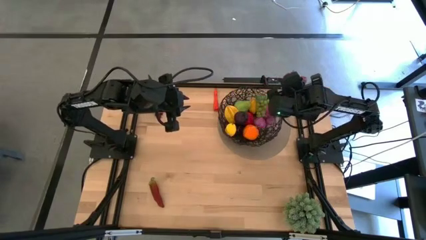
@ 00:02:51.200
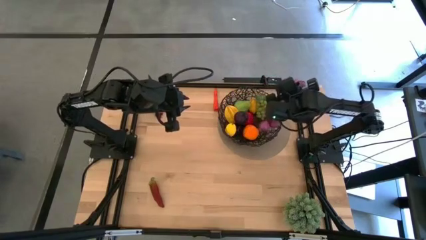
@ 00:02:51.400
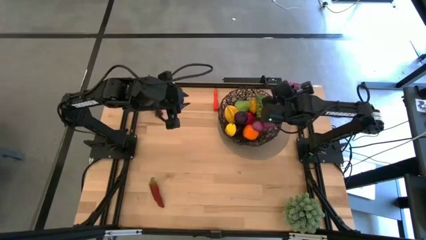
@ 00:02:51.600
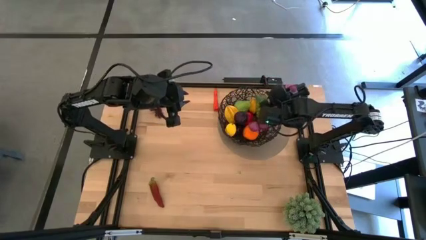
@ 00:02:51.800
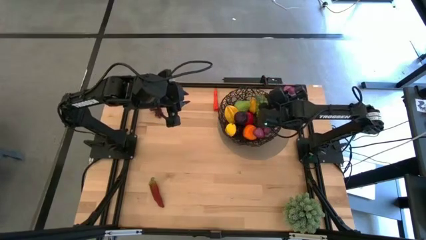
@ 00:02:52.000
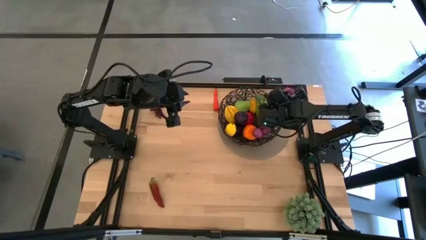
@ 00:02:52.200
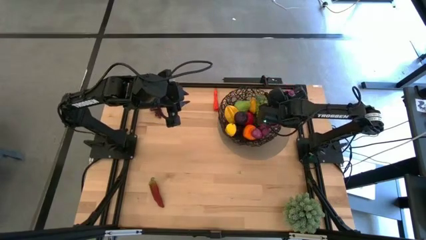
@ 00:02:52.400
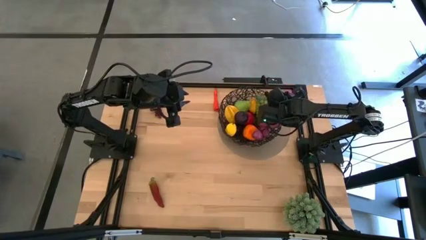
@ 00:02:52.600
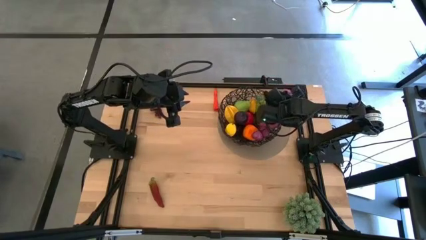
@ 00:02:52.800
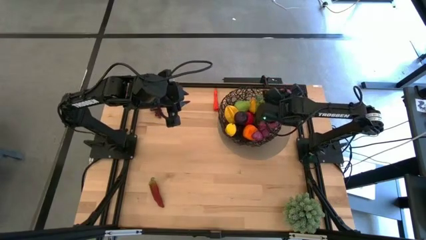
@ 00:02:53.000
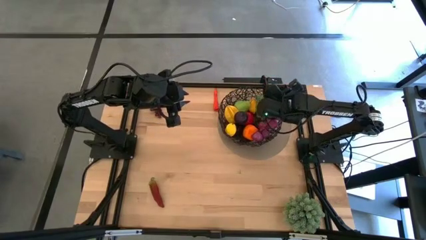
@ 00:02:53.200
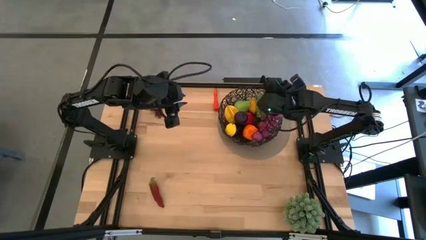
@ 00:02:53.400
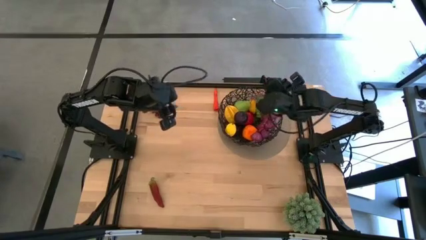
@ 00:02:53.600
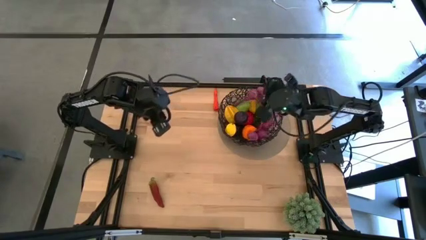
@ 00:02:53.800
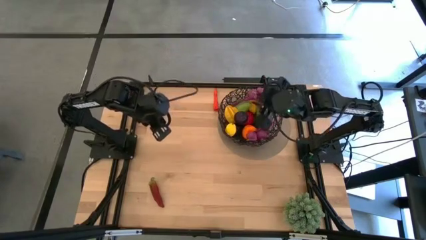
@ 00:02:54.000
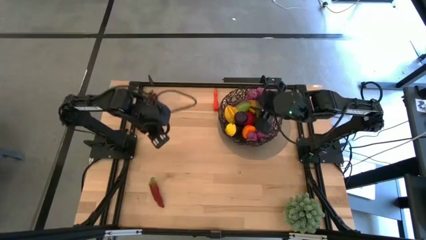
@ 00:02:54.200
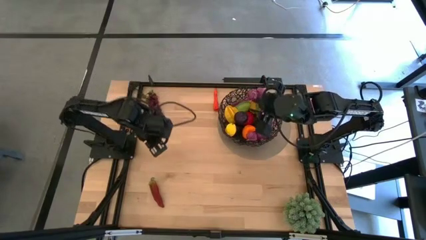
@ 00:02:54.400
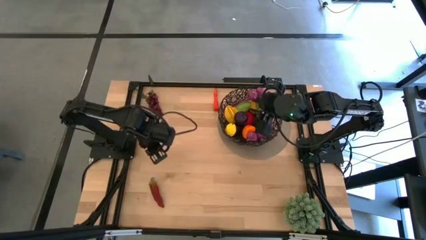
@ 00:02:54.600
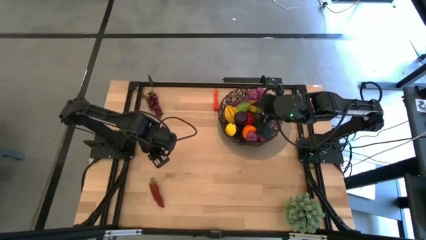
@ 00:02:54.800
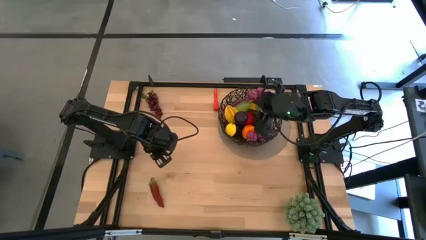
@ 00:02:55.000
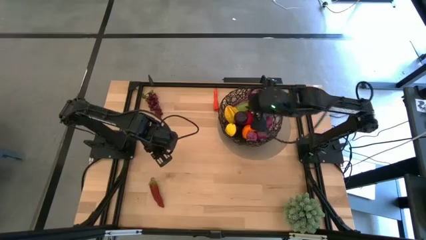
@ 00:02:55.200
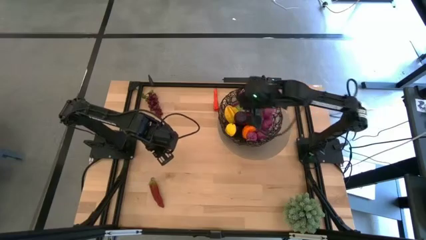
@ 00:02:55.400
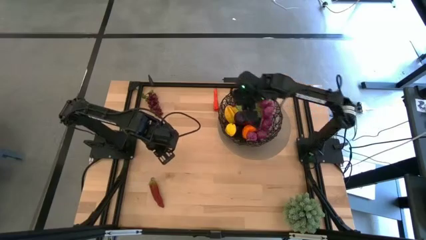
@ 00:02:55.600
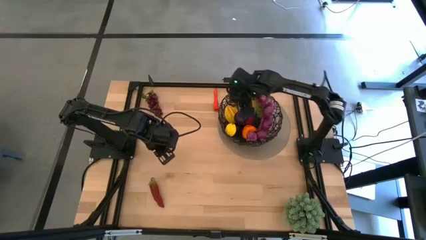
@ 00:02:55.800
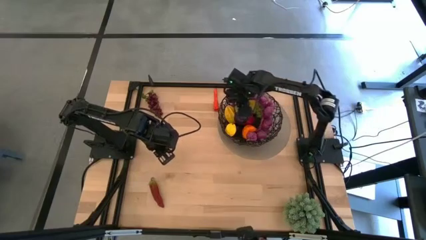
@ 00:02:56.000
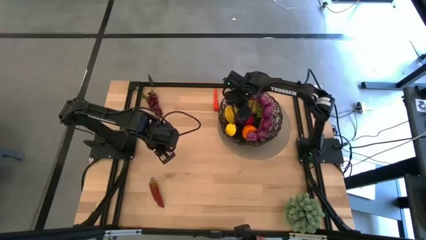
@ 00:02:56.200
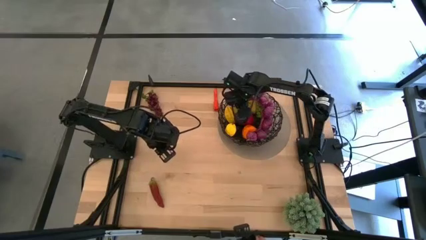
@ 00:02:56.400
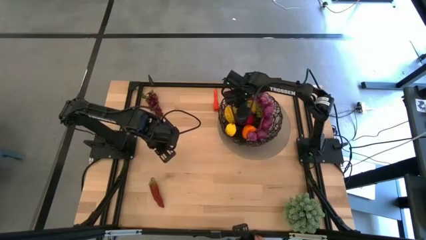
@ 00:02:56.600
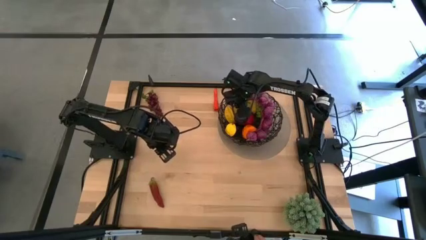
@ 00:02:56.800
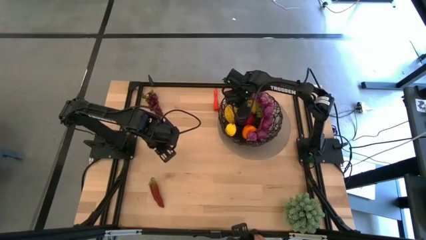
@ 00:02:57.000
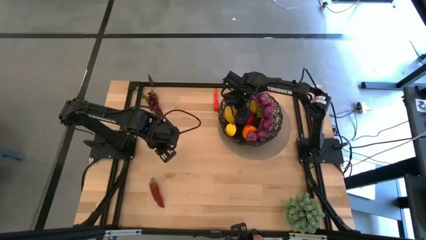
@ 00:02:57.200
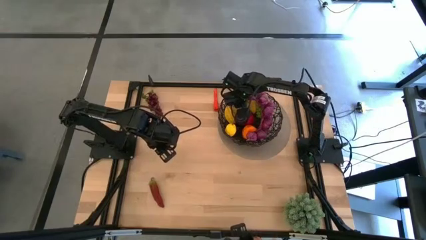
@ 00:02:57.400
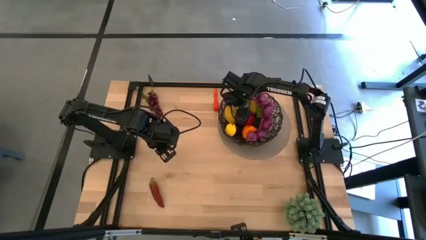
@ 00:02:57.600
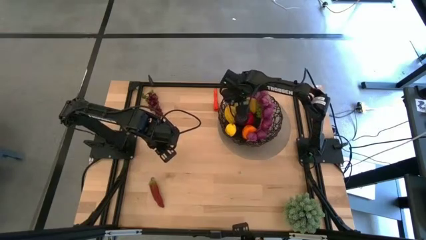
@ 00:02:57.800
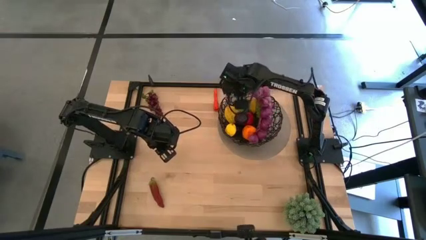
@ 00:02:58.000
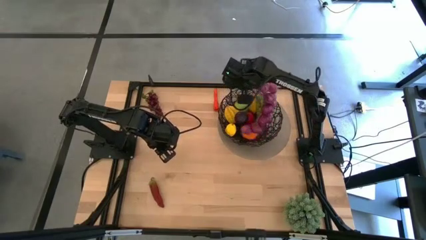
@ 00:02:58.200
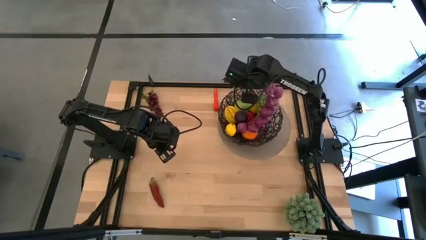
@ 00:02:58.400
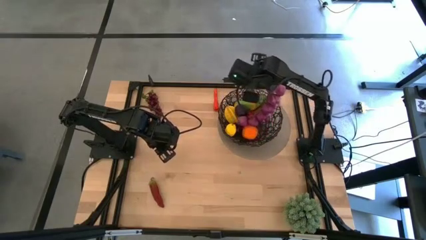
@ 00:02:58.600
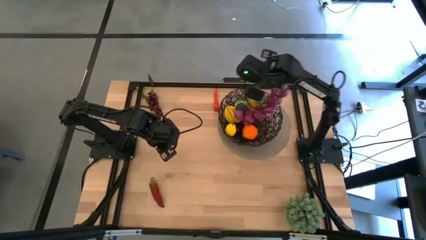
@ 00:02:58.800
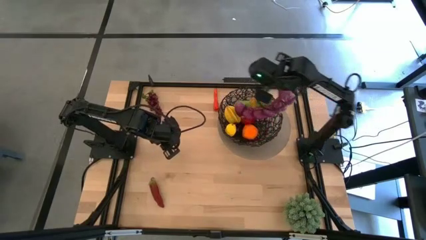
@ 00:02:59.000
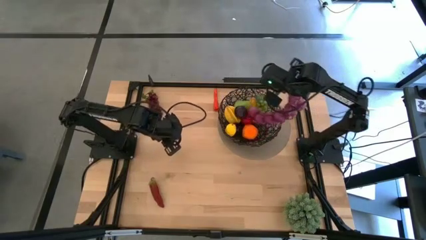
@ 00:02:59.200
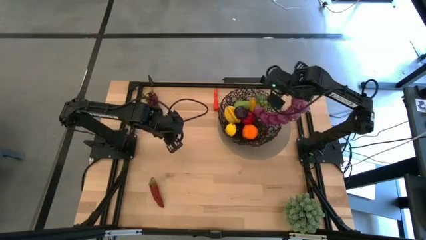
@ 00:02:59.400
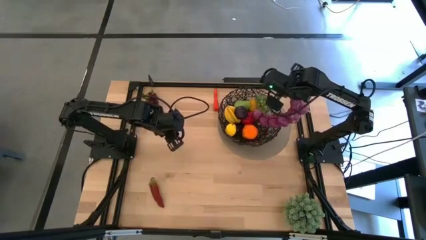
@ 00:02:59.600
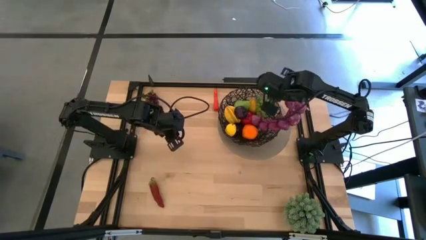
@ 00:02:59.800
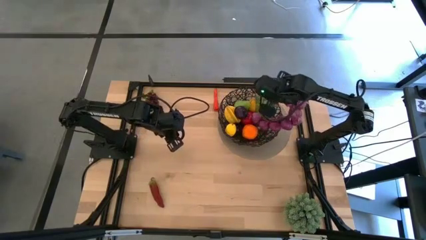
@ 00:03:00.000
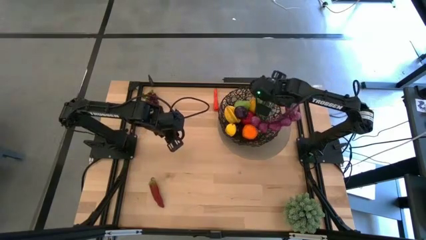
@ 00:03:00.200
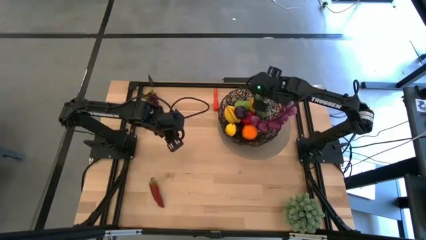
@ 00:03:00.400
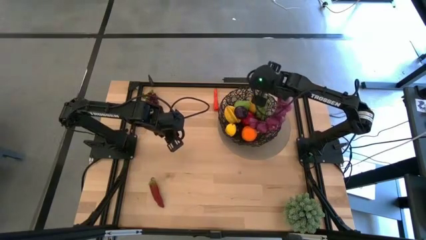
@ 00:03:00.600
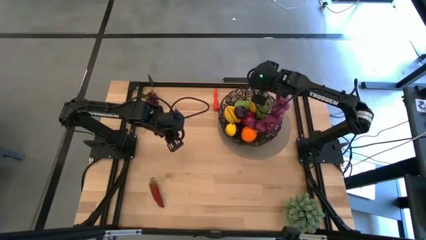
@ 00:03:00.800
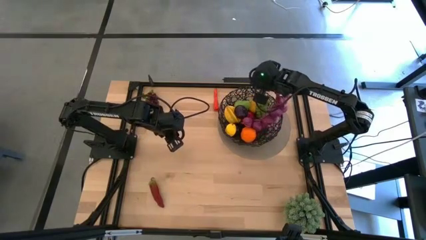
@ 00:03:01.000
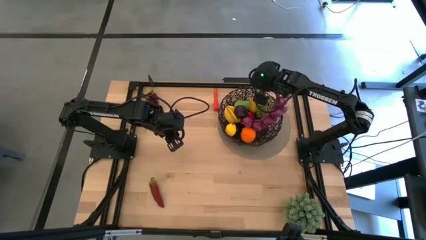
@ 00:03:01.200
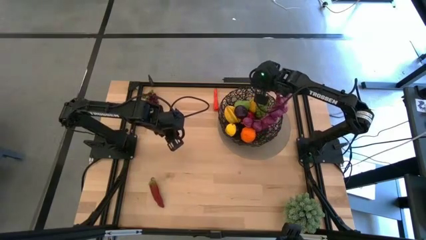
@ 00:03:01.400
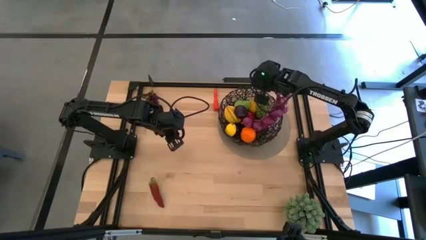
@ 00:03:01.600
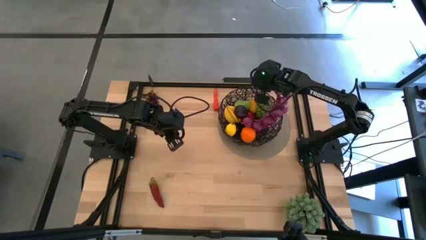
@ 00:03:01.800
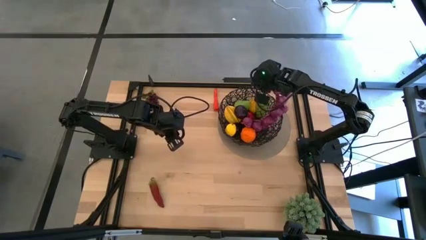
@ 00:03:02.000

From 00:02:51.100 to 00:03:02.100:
Task: Build produce basket
Put the purple garlic into the black wire basket

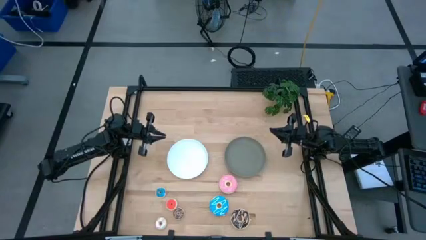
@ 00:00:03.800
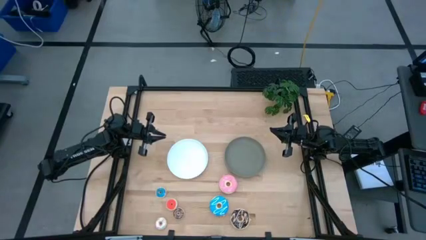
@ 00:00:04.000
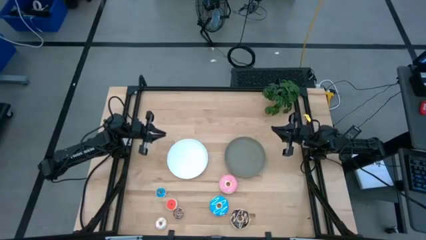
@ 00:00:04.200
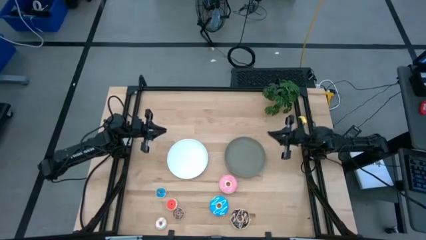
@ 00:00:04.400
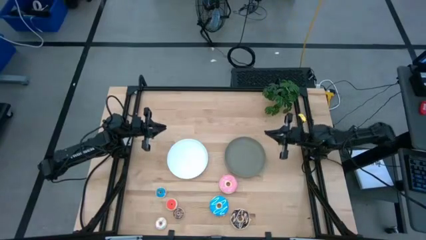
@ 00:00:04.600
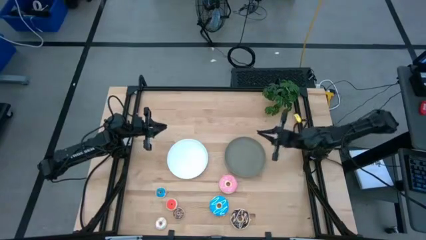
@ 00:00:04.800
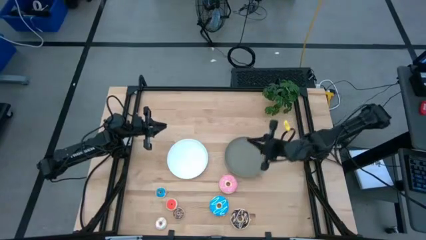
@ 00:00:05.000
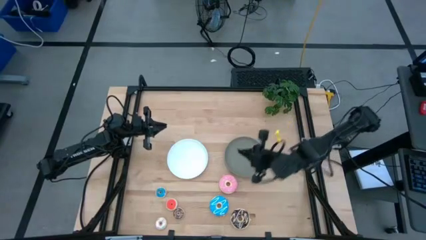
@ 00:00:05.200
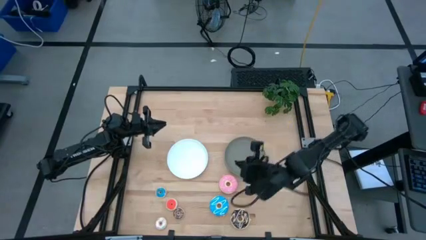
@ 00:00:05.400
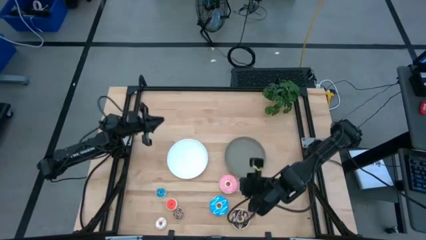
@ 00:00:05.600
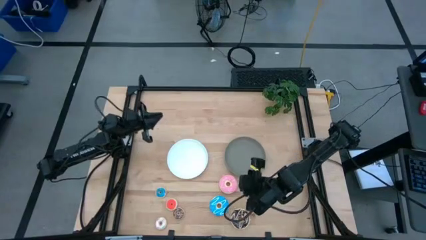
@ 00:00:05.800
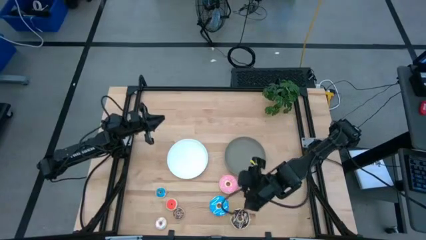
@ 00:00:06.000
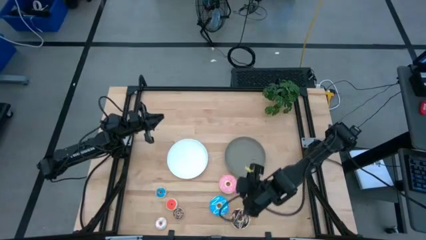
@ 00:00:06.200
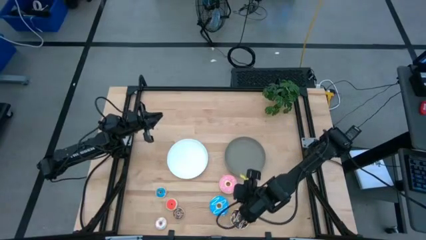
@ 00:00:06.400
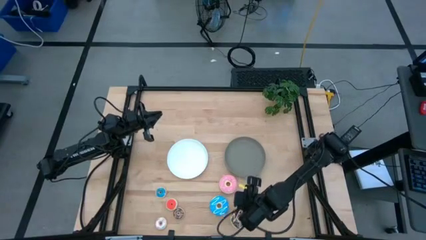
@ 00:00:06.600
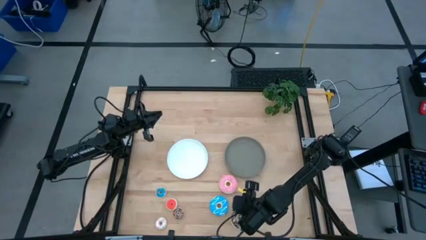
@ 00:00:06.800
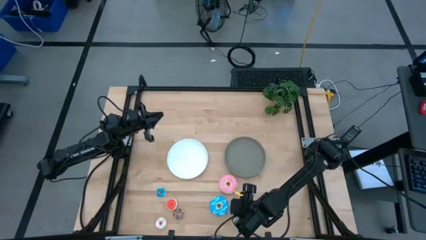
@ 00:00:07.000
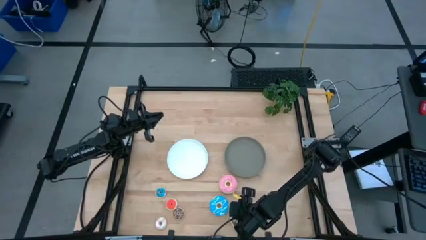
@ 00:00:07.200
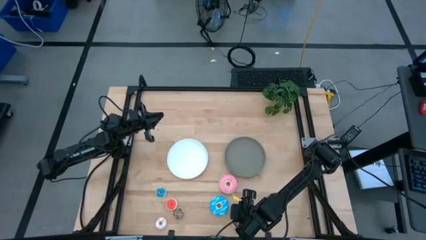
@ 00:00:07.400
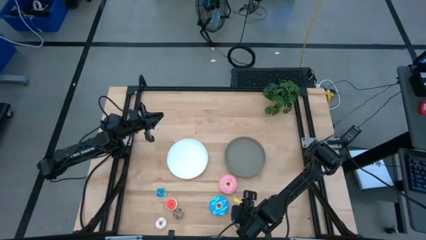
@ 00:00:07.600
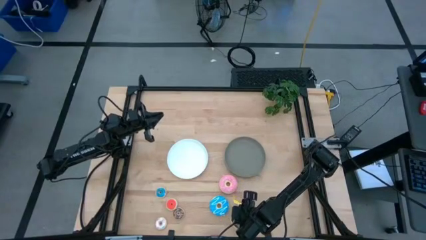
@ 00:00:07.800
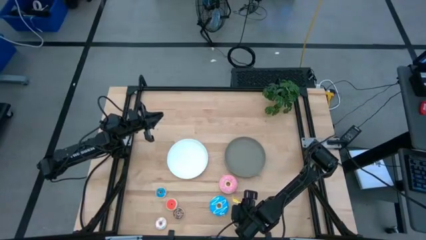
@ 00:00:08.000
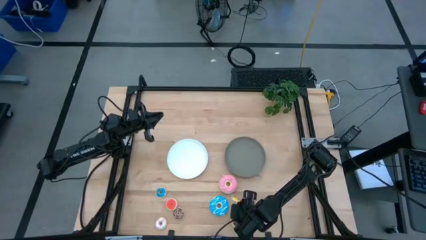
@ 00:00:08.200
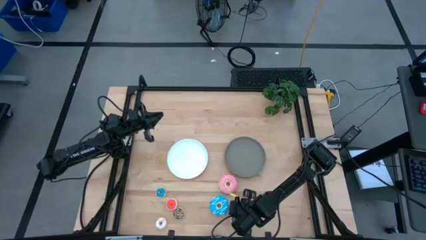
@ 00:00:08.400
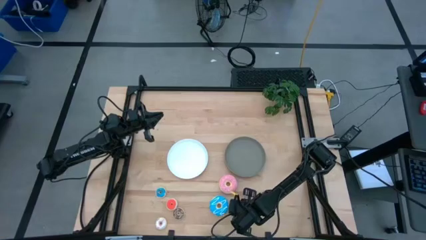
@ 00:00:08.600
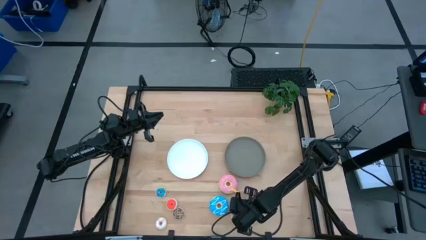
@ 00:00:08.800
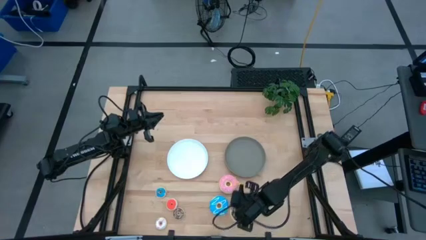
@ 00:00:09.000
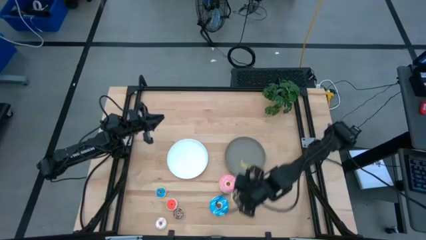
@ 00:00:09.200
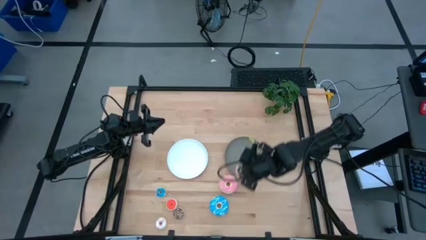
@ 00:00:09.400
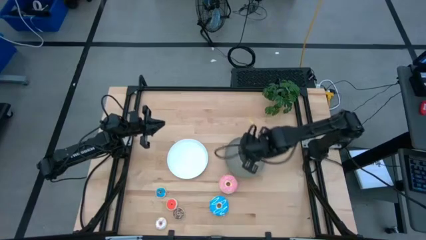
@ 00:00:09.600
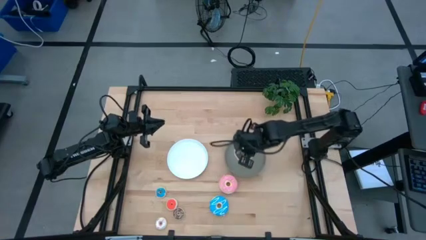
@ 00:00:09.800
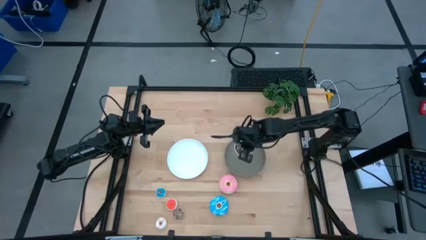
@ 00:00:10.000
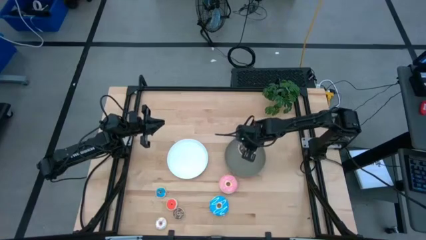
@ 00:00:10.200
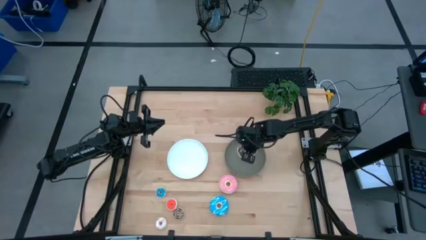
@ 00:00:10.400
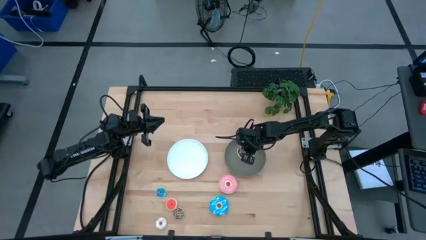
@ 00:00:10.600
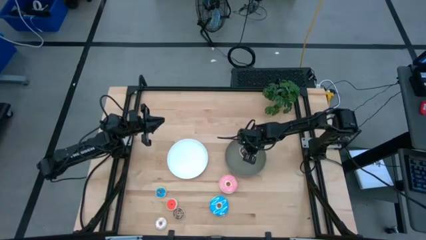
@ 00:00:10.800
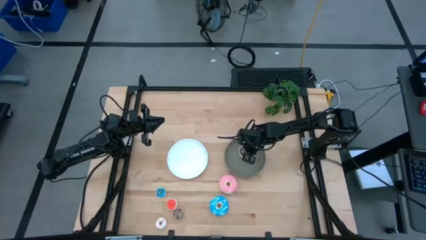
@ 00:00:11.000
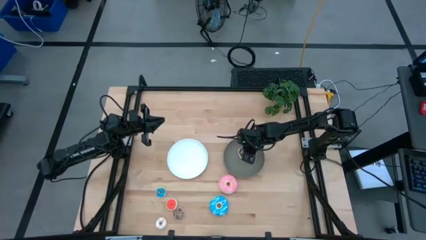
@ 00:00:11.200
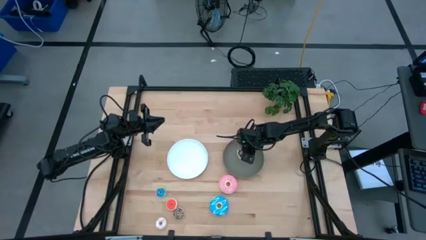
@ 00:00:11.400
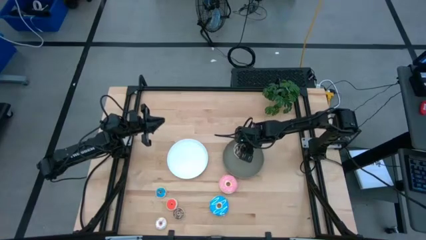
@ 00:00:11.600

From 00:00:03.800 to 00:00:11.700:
Task: Pick & Place donuts
Put the large black donut on the gray plate
